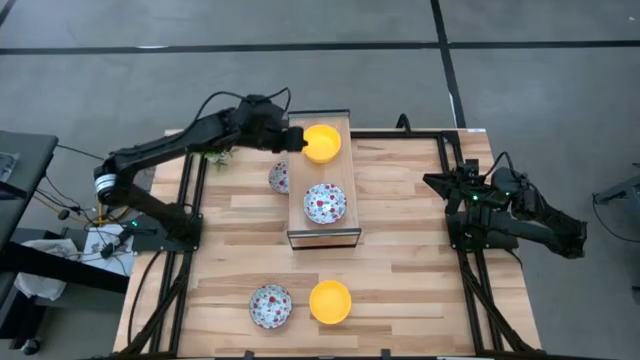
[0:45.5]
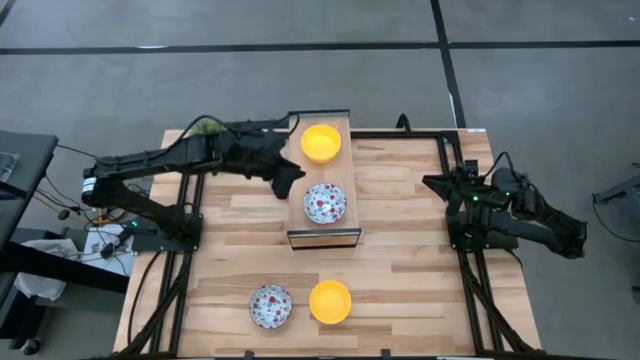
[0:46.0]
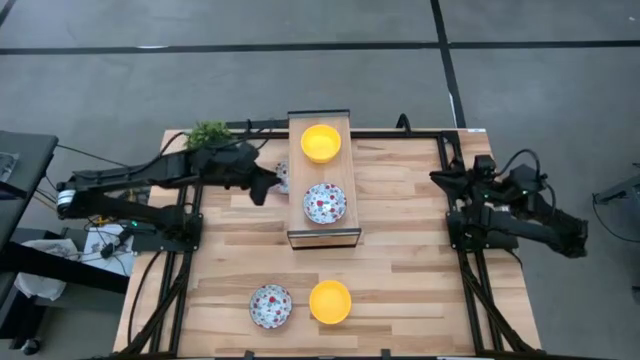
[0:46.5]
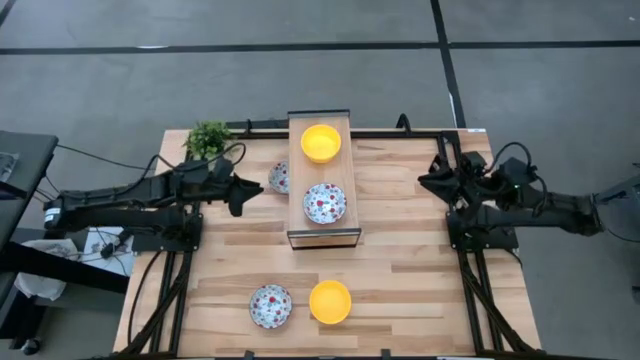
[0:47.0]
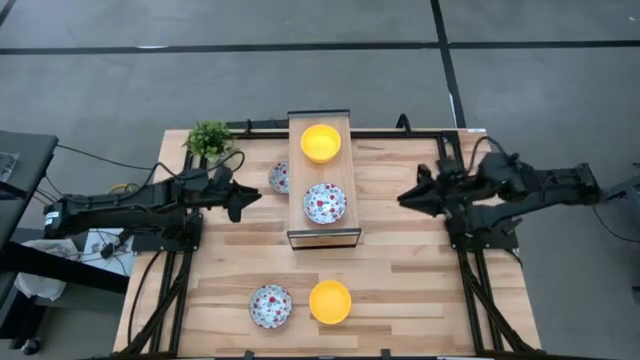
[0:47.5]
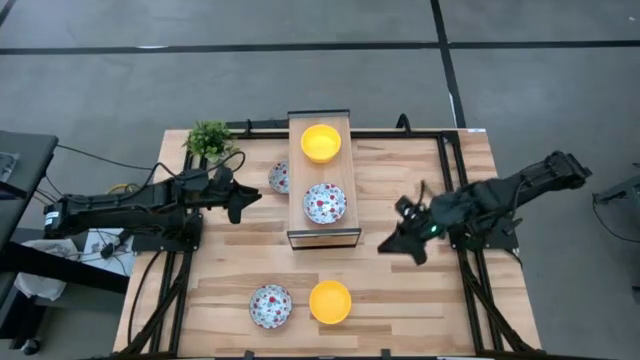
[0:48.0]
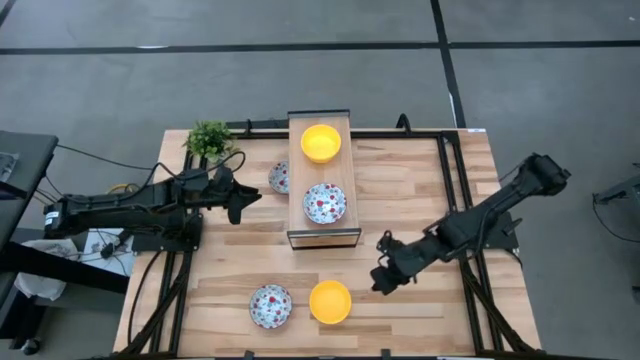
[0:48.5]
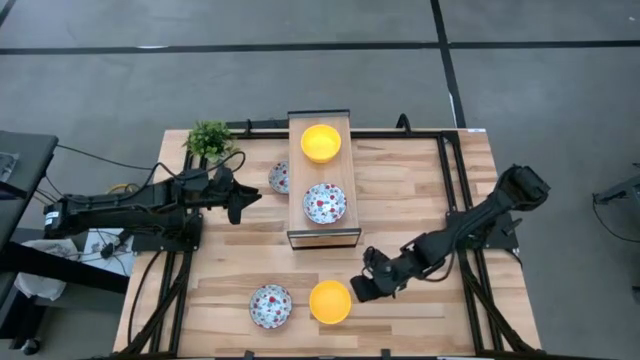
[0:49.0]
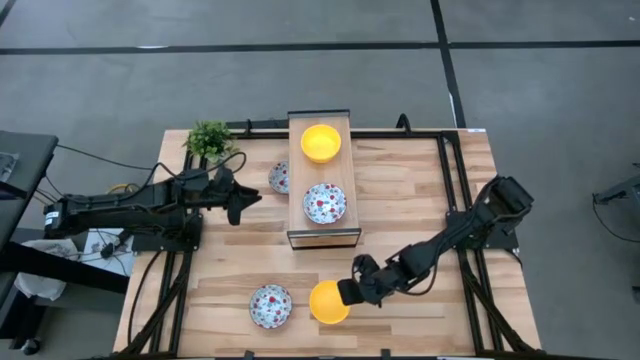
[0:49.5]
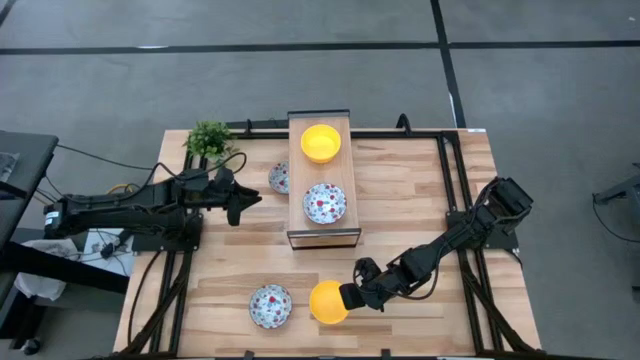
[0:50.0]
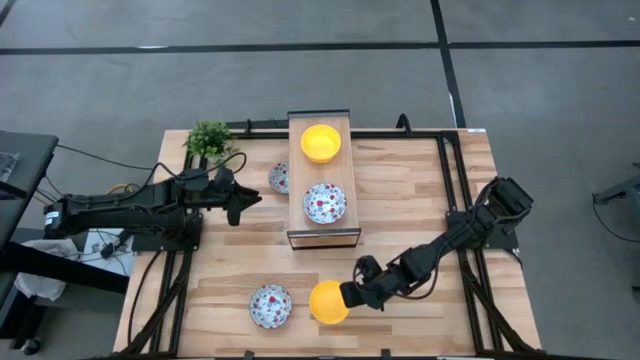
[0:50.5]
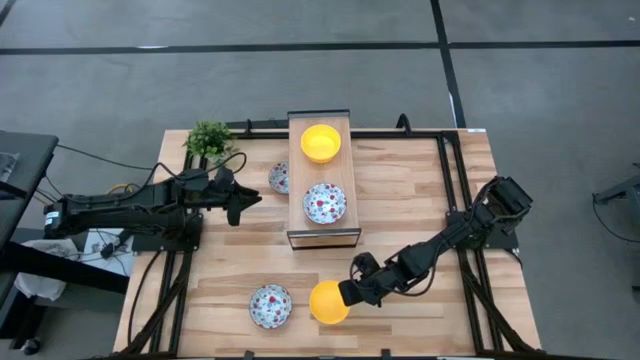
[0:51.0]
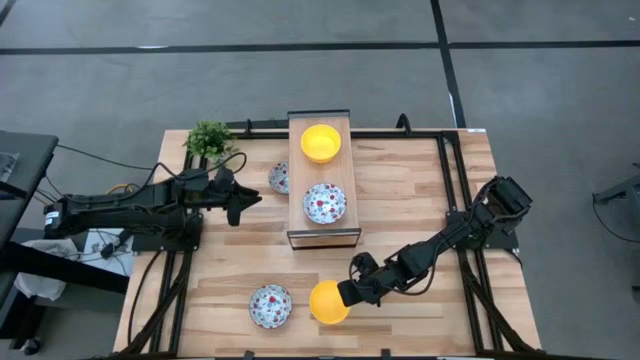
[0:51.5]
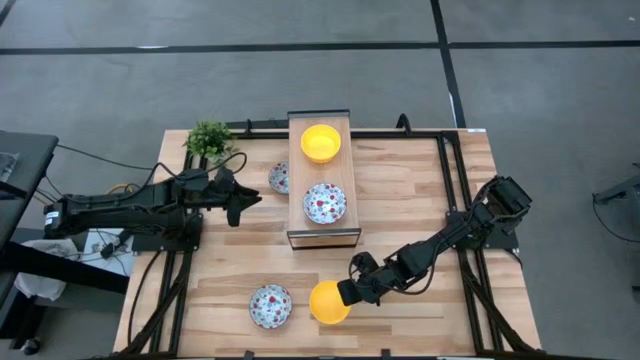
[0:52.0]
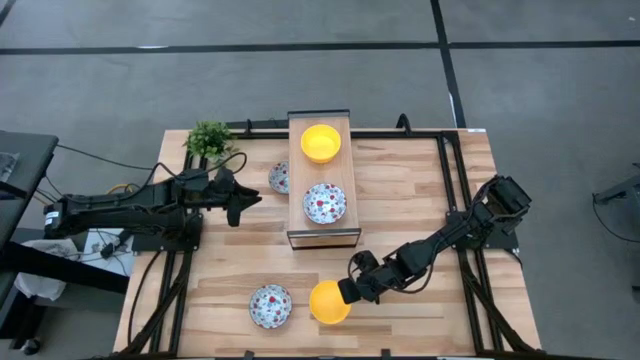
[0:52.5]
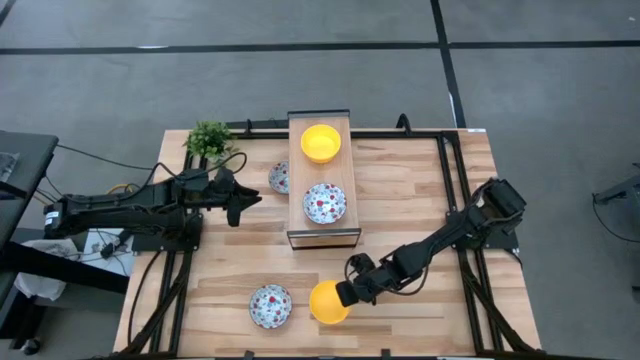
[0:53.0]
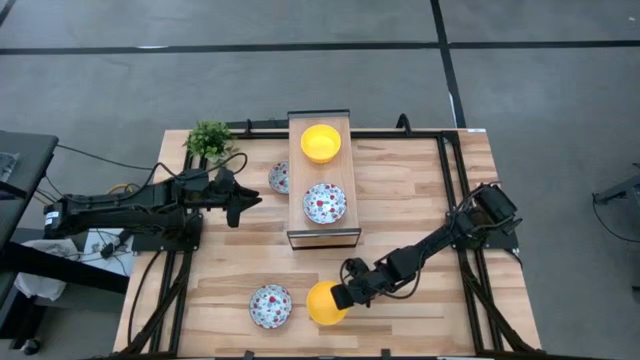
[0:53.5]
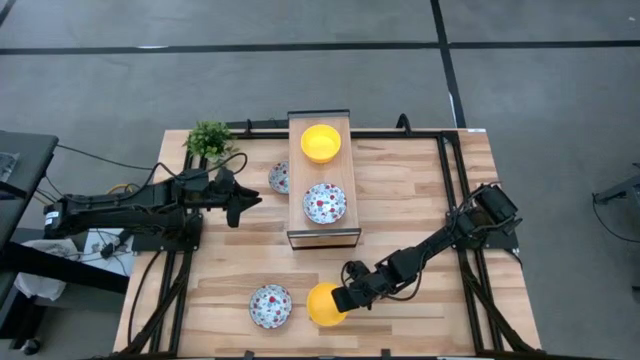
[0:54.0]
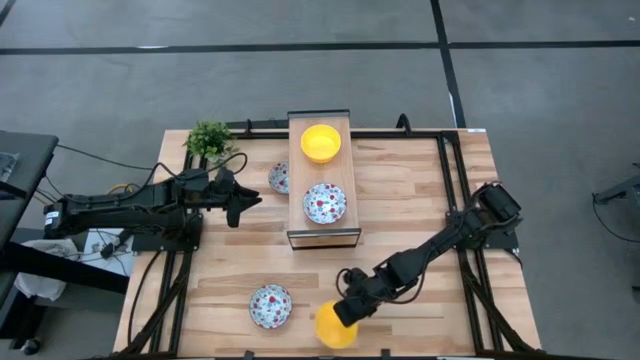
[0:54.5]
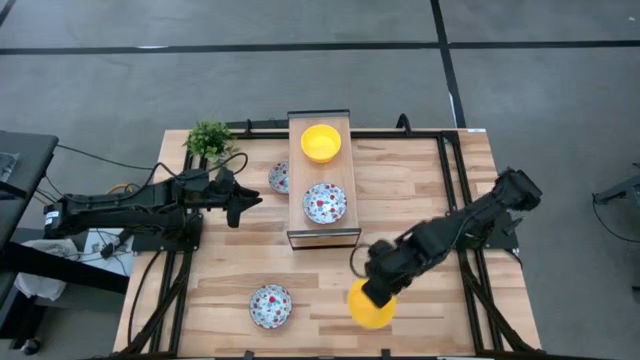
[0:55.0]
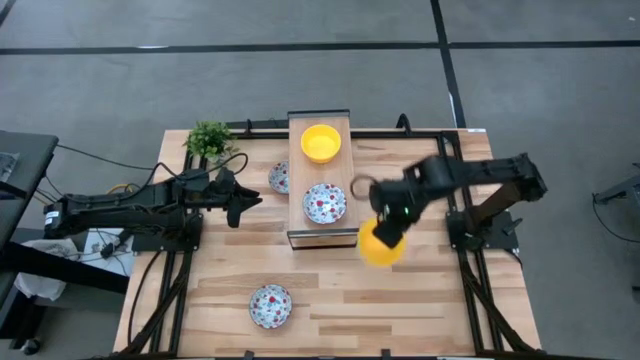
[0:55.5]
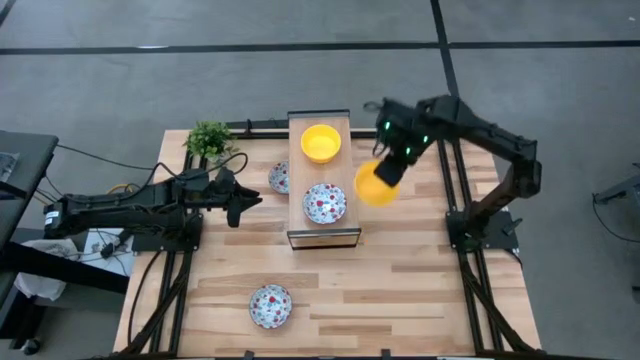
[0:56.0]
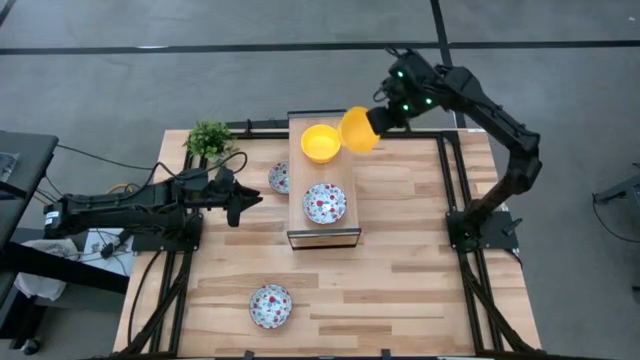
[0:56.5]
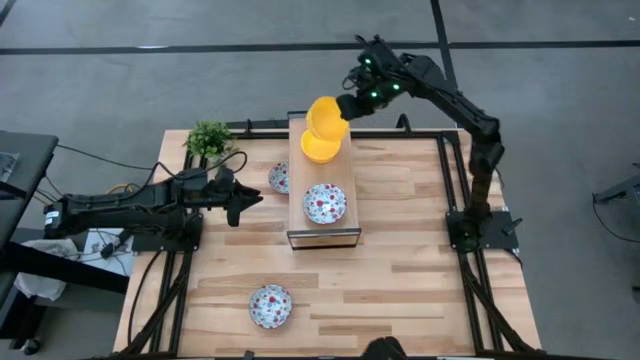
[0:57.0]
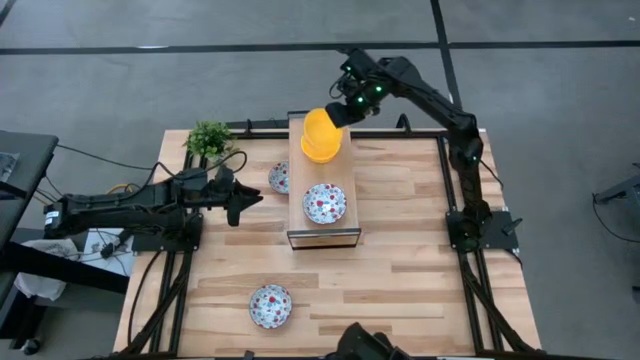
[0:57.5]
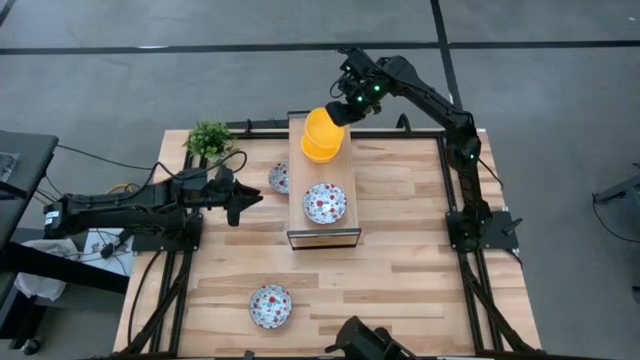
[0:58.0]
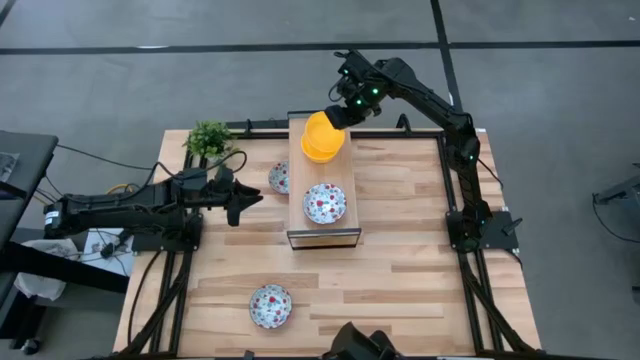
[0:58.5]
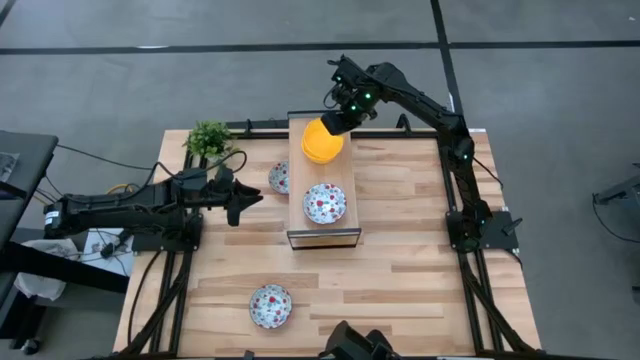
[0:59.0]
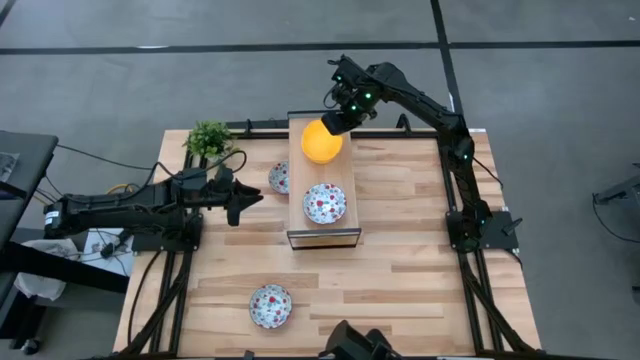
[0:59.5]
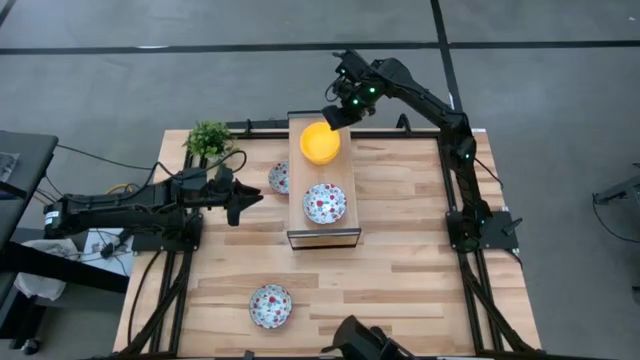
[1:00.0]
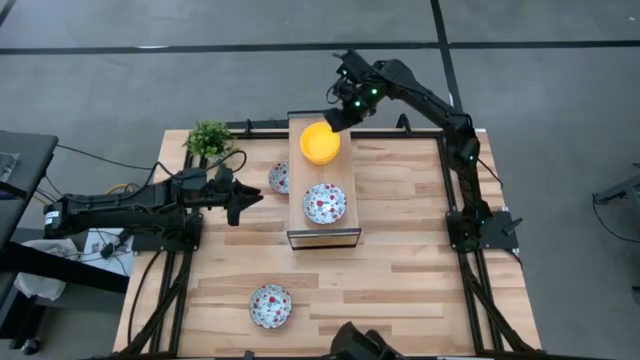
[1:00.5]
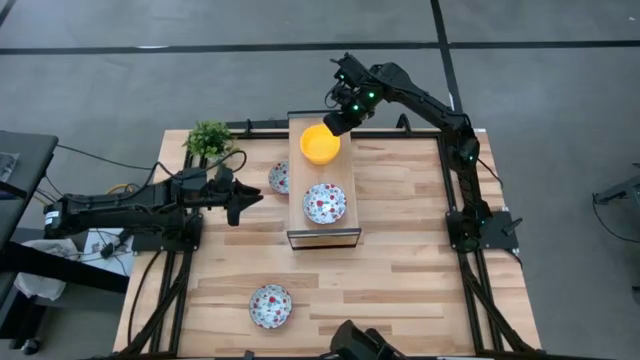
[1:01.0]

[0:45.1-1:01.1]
Task: Pick & Place Mini bowls
Stack the yellow bowl on top of the yellow bowls on the shelf

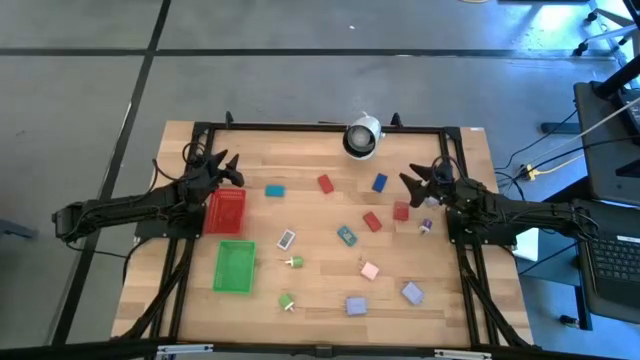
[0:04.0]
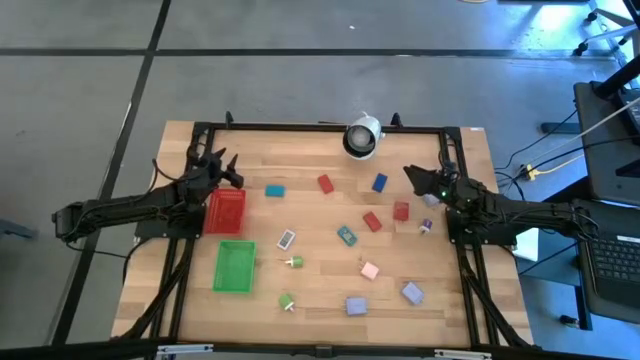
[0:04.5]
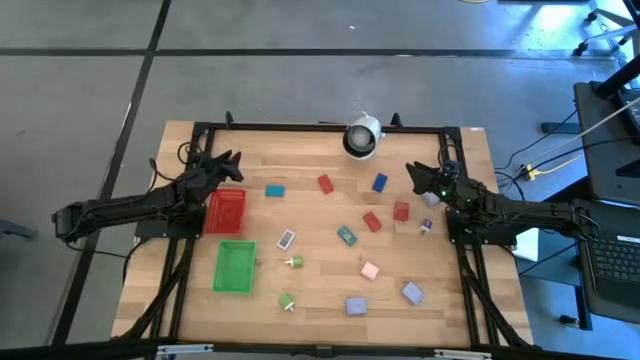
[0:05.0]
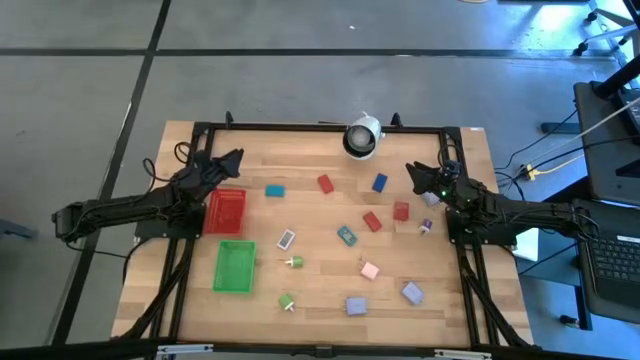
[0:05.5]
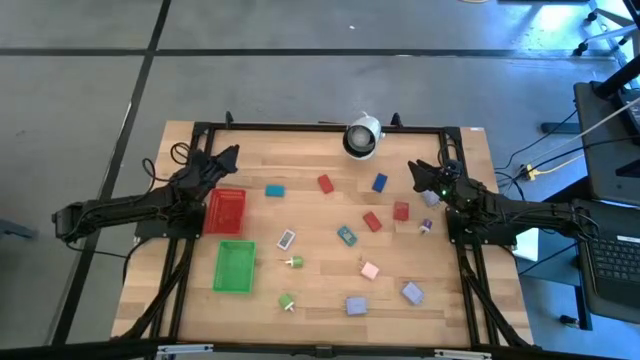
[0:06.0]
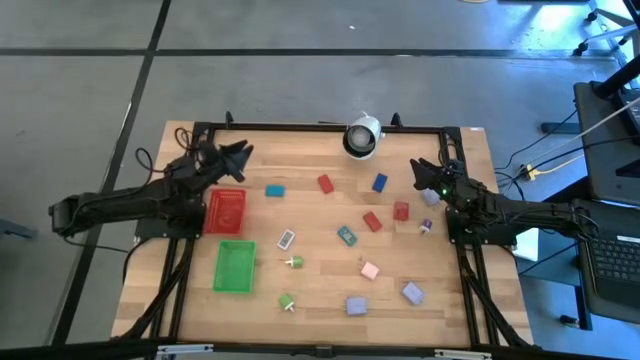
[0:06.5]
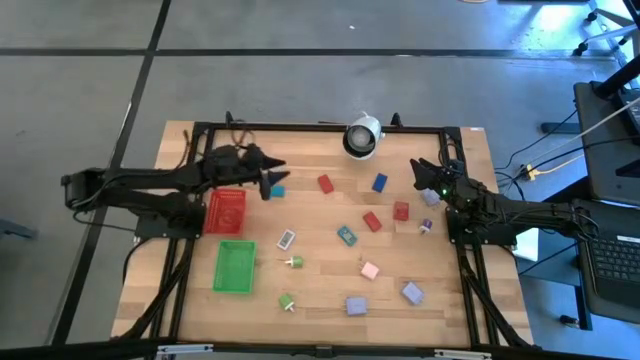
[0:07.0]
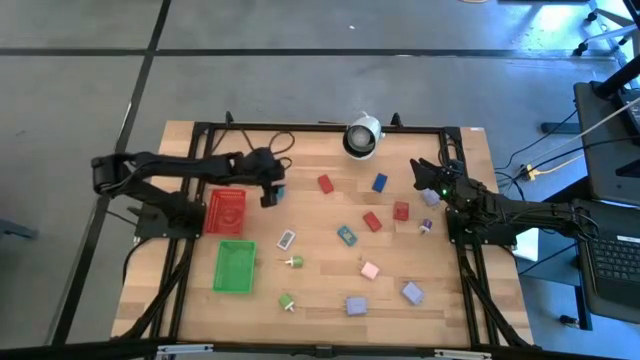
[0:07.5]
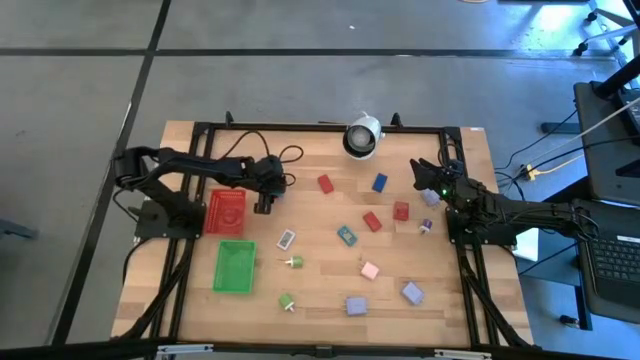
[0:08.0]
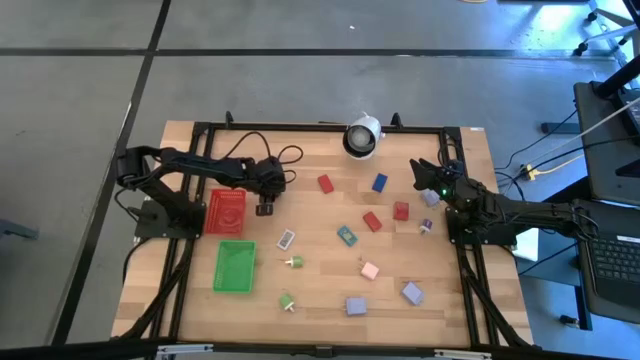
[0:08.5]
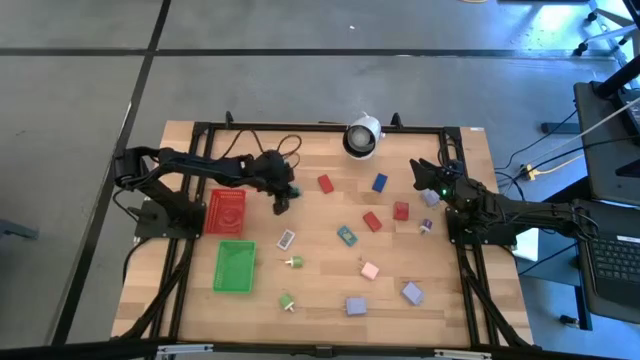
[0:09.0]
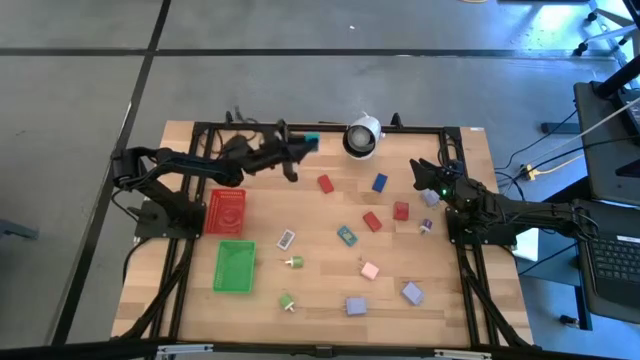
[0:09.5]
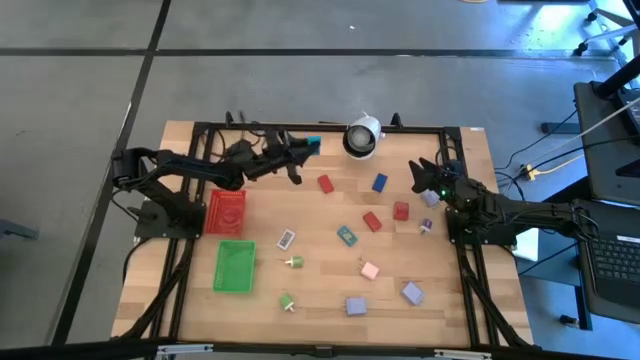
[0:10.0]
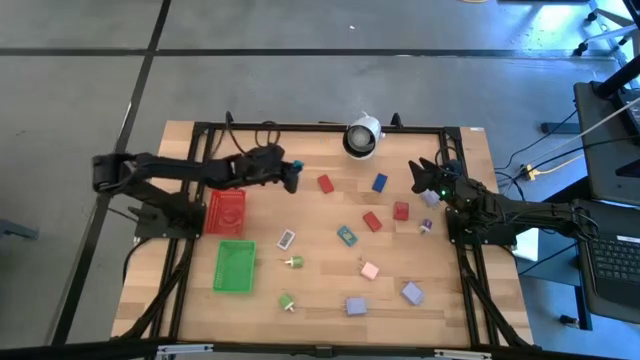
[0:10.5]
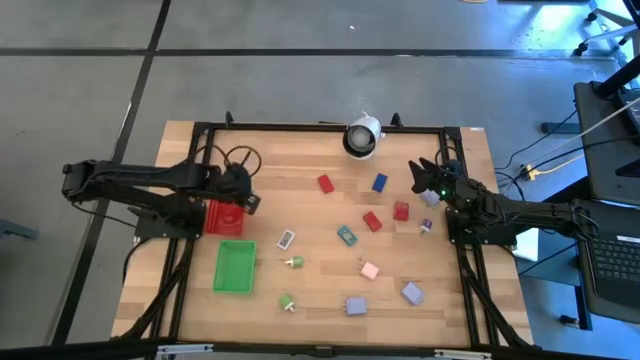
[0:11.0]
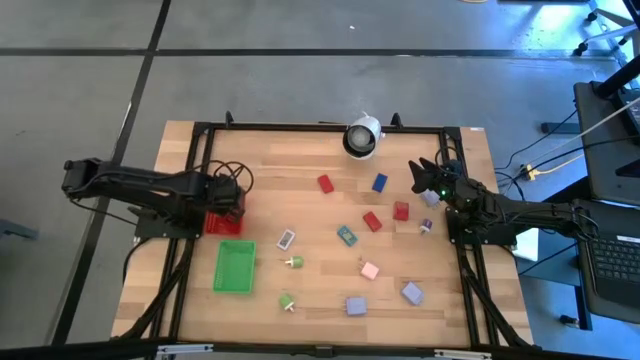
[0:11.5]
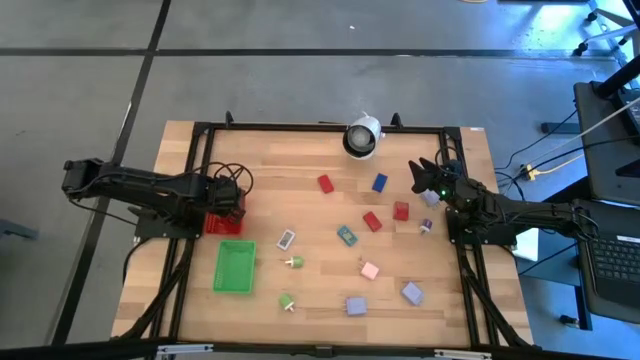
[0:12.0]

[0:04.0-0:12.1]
Task: Pick & Place Office items
Put the top light blue digital timer into the red bin
